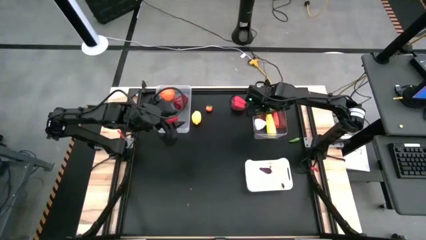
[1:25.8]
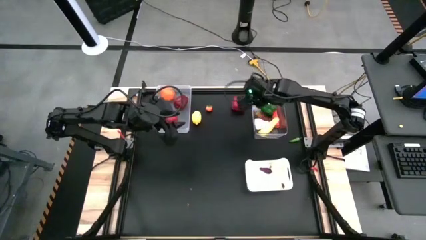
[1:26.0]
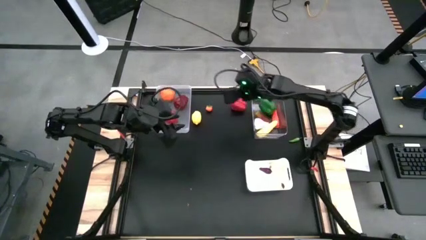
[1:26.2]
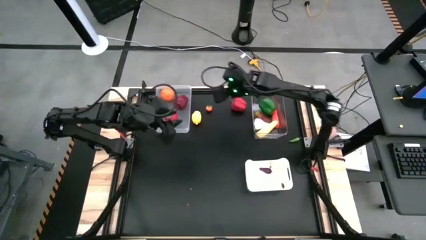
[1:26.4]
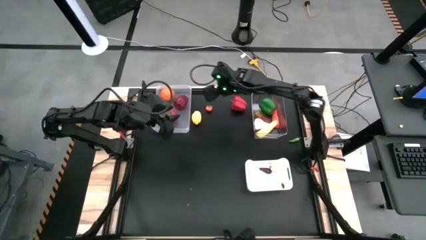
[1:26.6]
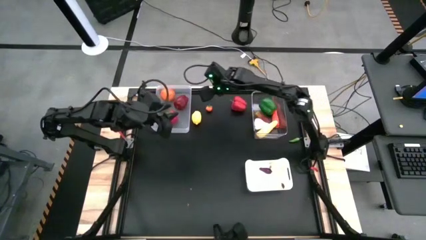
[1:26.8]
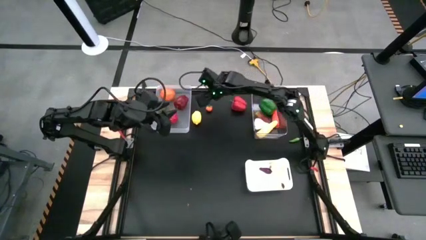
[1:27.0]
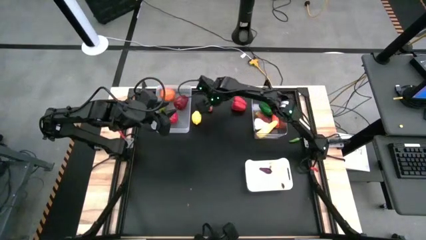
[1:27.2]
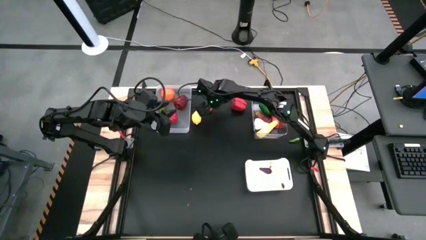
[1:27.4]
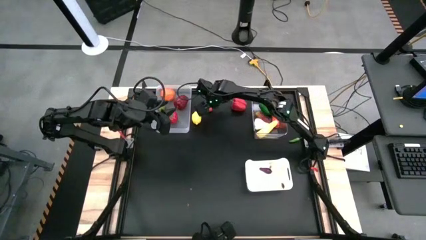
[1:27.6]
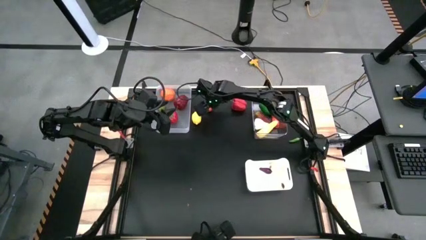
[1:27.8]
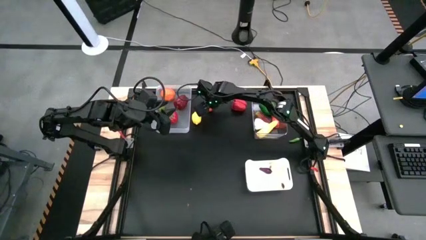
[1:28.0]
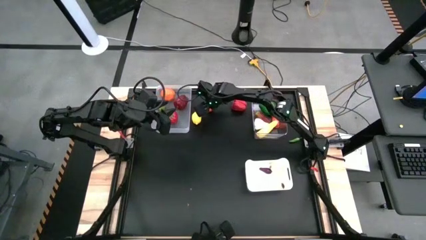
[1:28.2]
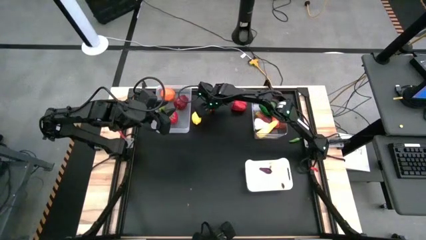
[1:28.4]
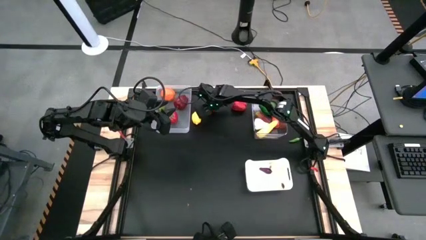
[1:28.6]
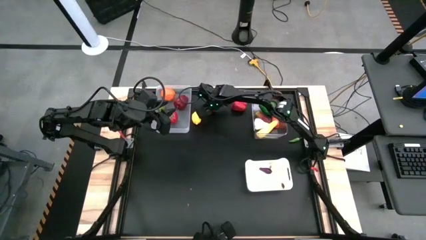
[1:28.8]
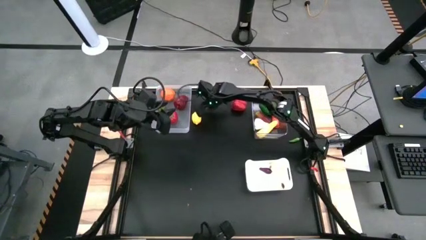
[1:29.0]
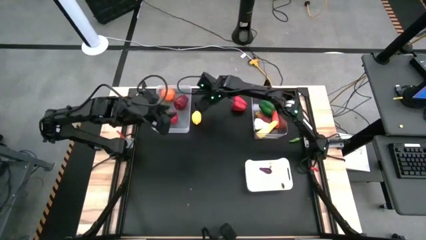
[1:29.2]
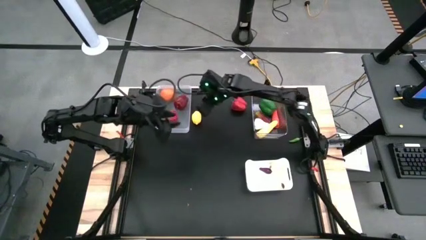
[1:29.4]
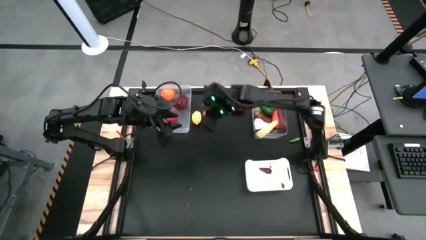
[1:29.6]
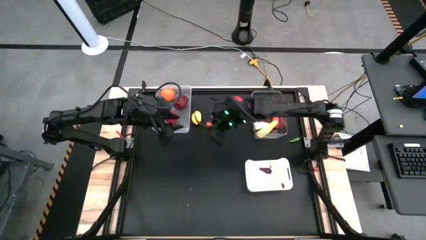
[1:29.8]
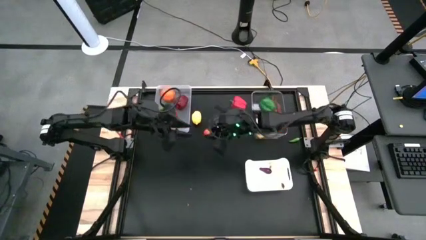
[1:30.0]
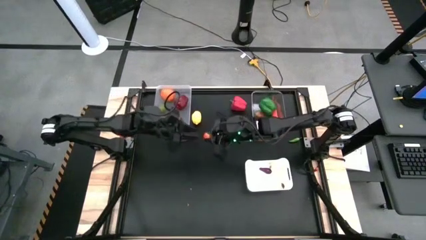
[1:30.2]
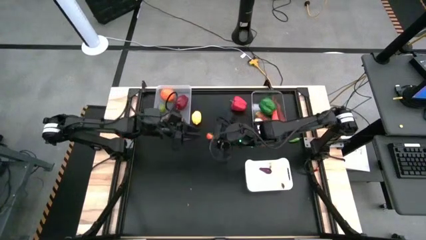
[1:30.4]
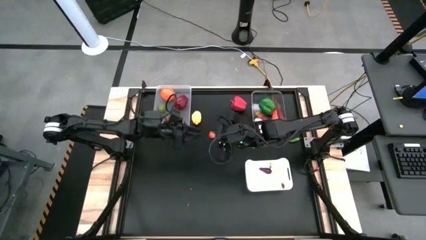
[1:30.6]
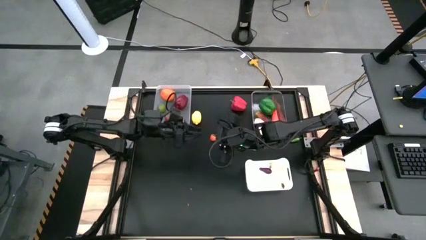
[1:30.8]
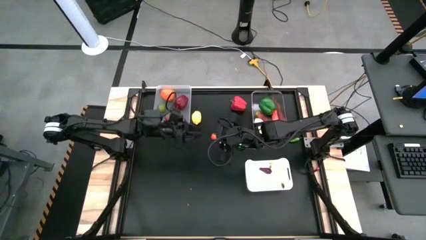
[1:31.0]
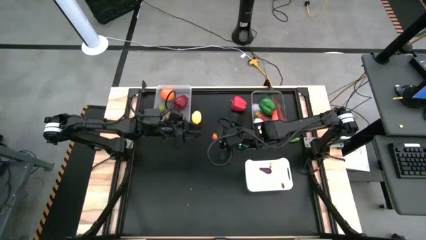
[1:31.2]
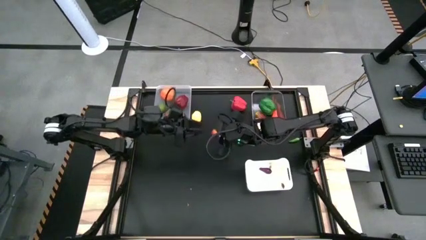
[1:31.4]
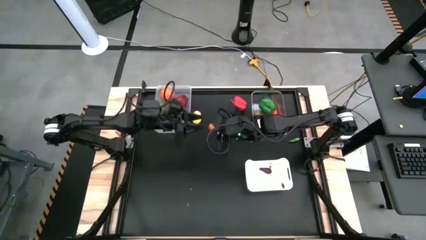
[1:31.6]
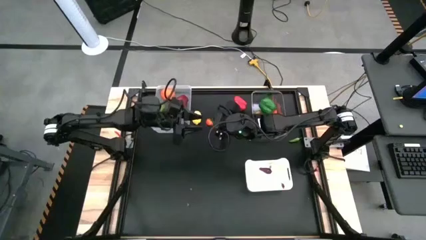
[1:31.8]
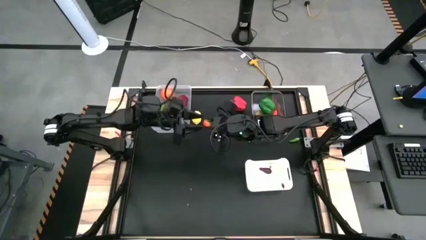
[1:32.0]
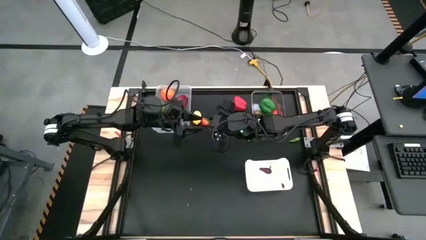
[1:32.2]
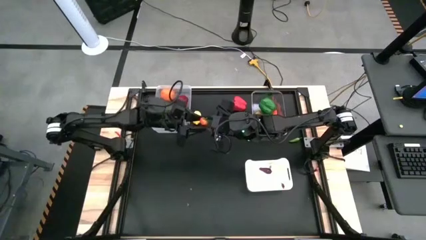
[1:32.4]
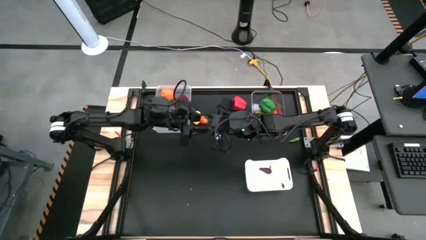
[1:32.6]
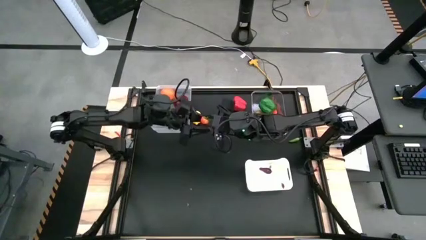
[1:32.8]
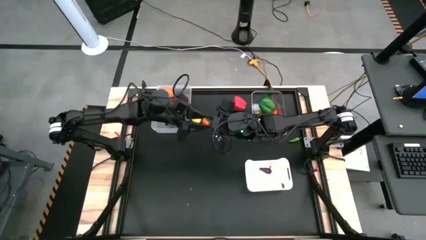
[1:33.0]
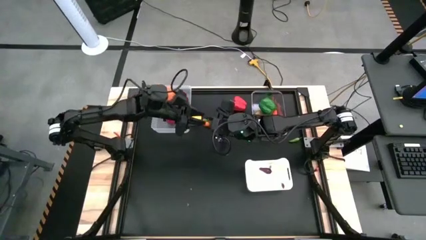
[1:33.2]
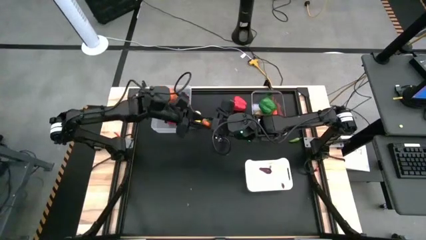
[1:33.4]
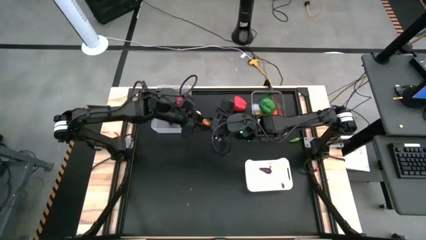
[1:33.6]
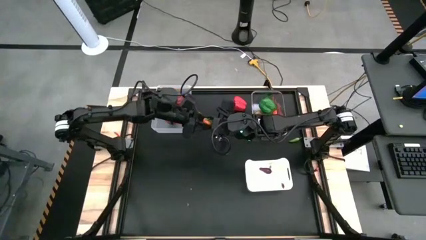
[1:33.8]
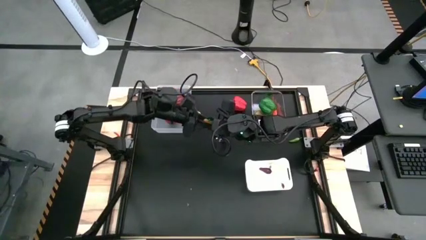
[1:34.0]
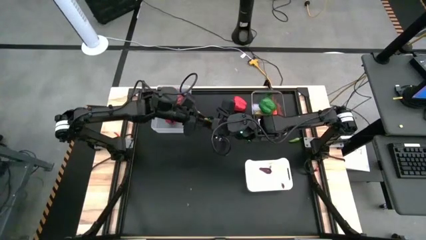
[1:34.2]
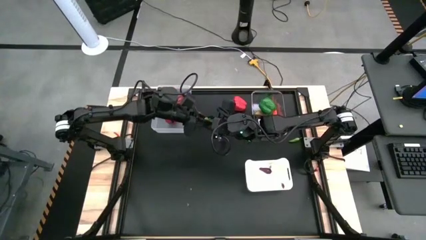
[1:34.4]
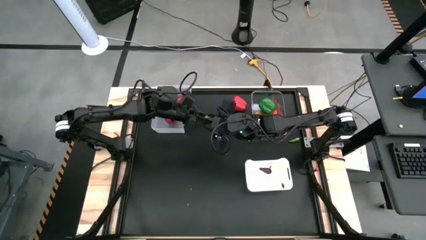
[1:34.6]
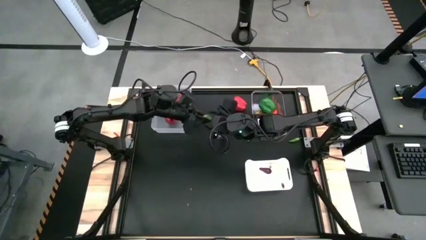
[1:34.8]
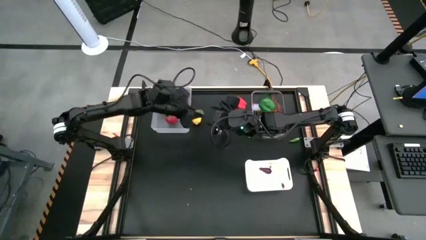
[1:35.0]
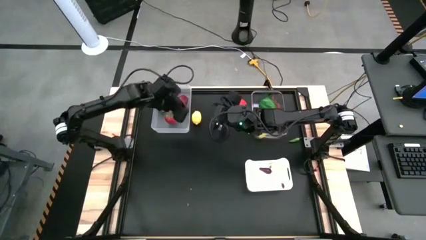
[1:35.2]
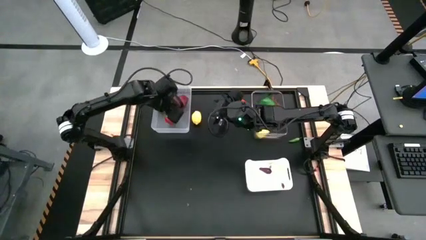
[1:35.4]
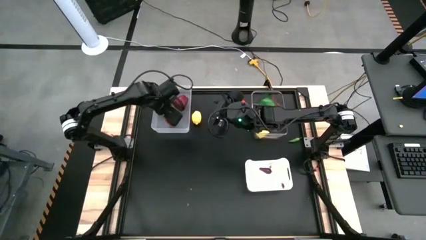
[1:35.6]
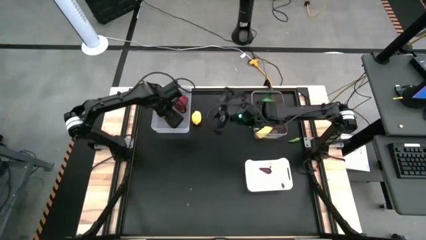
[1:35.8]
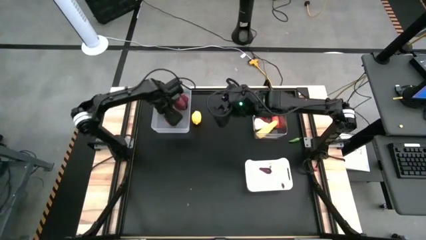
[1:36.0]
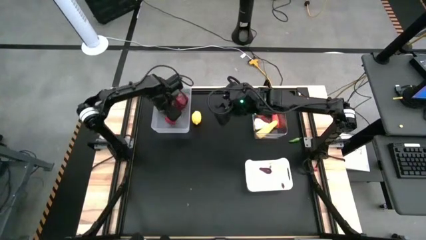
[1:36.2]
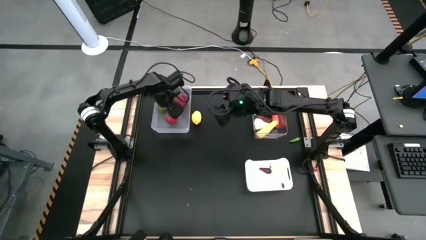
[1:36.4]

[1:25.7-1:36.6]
Task: Sort produce into baskets
Put the orange persimmon into the light white bin

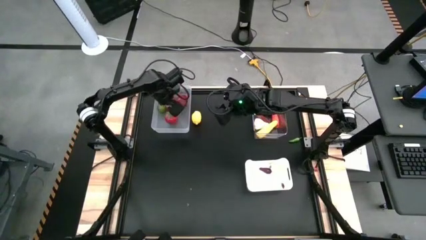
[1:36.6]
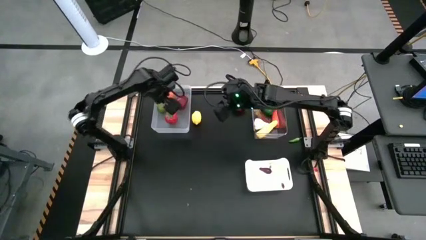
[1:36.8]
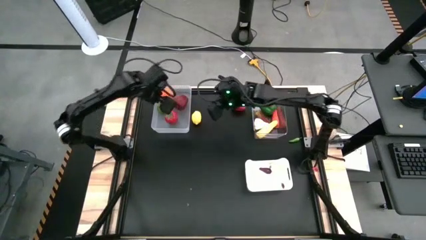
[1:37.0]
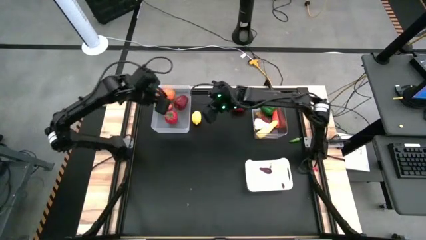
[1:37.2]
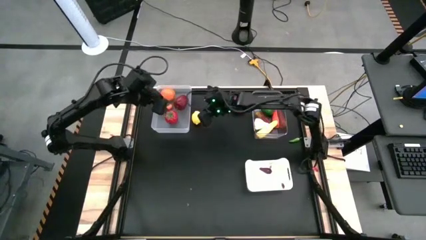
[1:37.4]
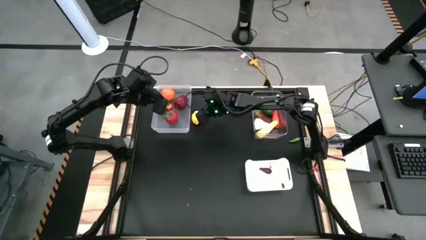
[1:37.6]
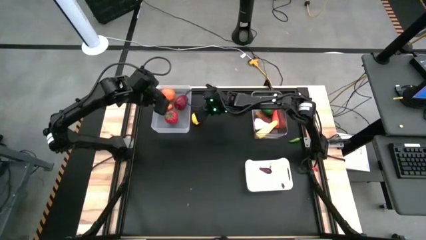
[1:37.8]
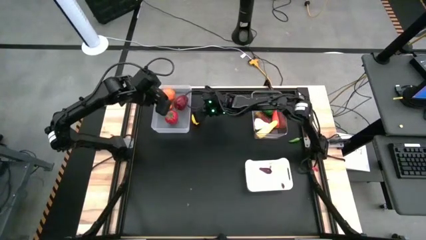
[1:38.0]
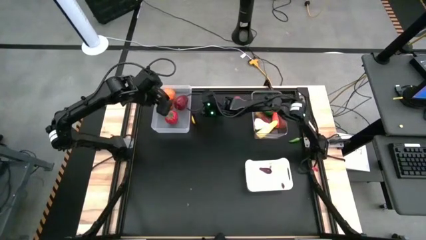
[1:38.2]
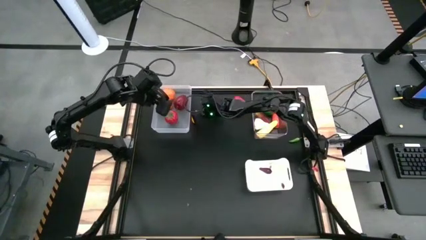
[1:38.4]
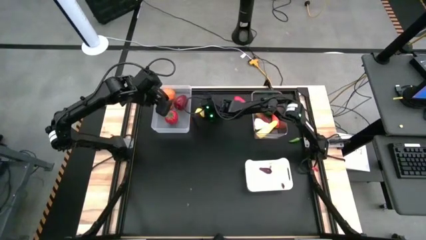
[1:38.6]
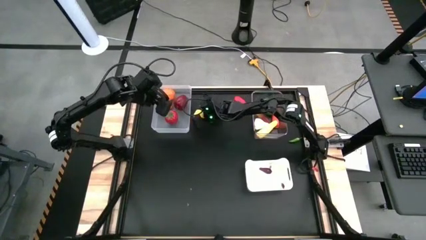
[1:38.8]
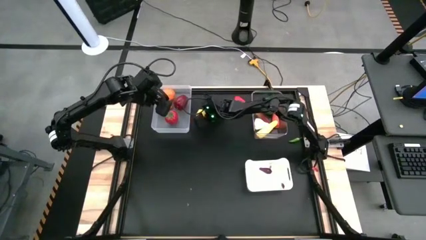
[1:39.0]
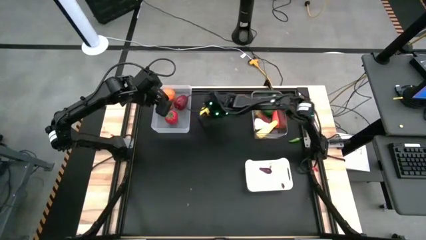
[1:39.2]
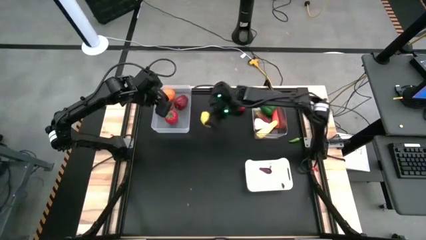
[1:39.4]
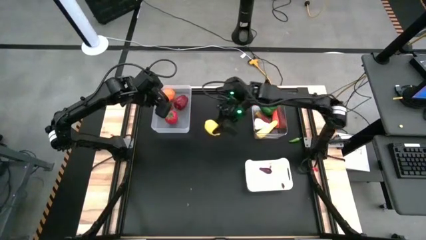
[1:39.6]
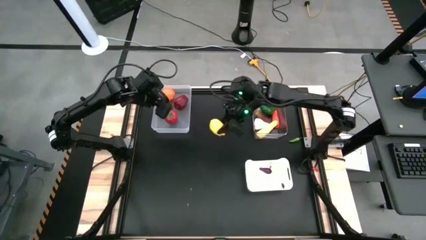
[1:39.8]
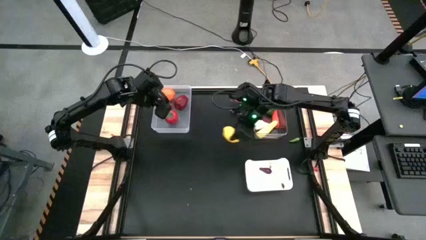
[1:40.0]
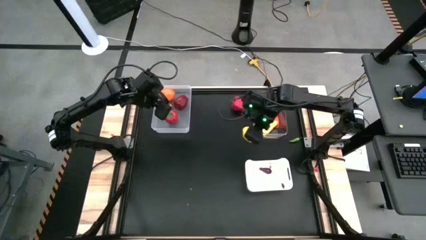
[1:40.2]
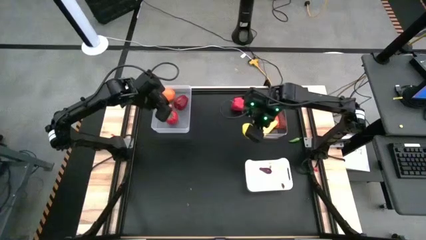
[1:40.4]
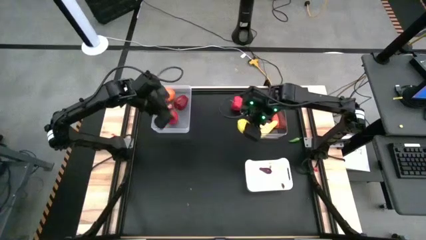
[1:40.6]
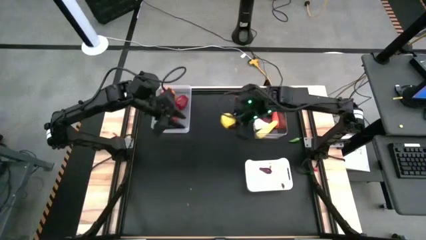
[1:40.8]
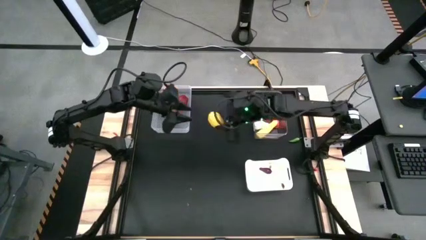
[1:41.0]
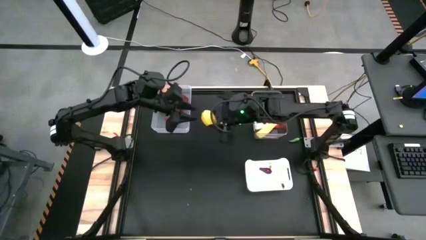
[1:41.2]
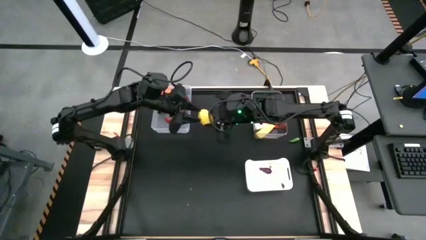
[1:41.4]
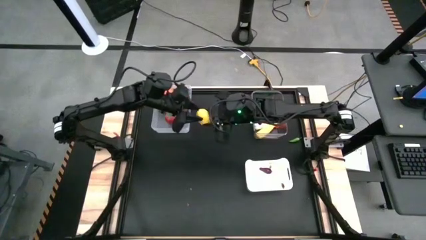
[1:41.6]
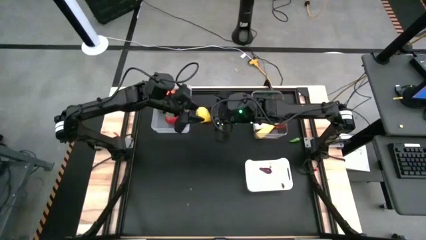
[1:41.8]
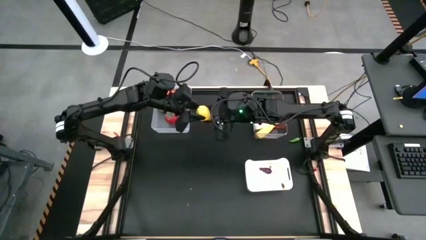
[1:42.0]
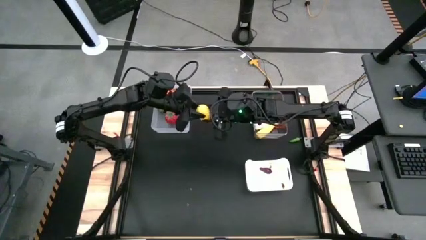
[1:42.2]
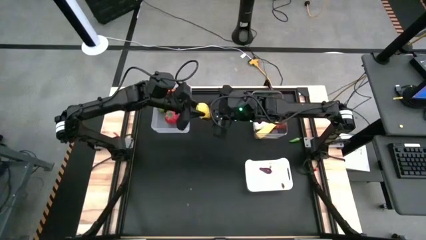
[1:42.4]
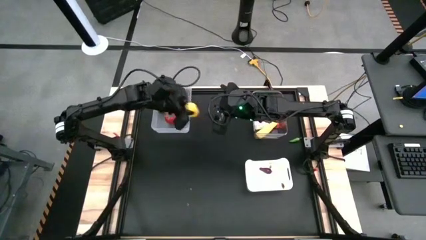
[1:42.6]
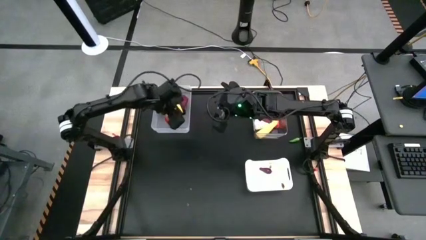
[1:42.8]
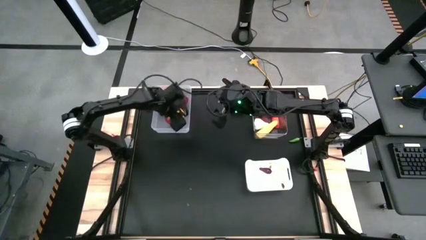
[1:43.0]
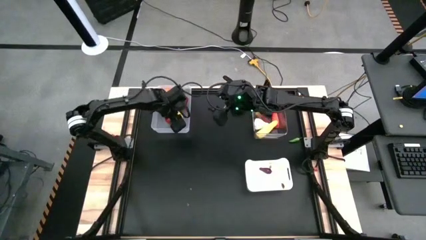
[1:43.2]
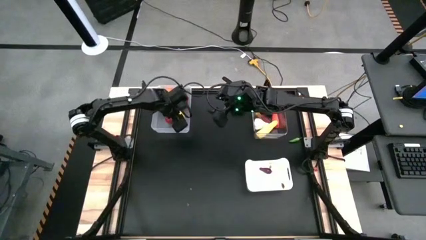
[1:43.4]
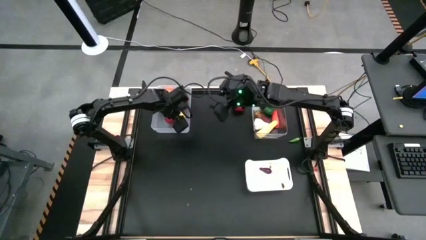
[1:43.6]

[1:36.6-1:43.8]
Put the yellow lemon into the light white bin
